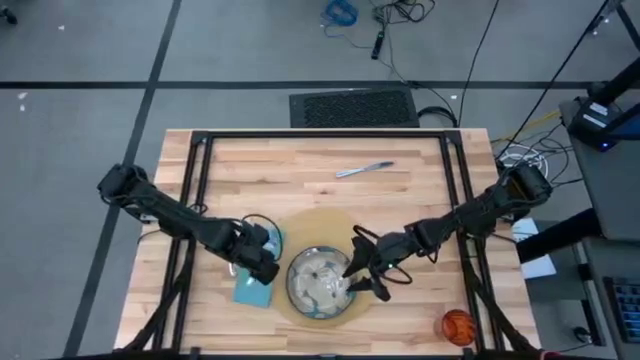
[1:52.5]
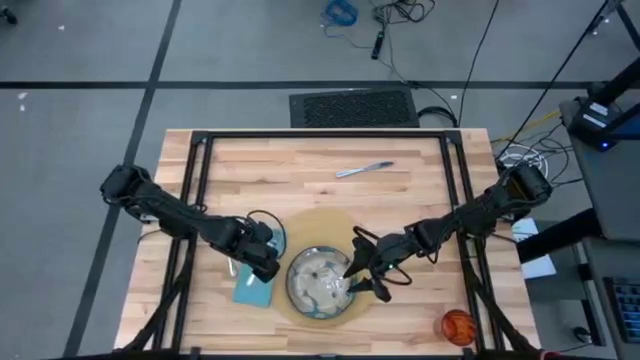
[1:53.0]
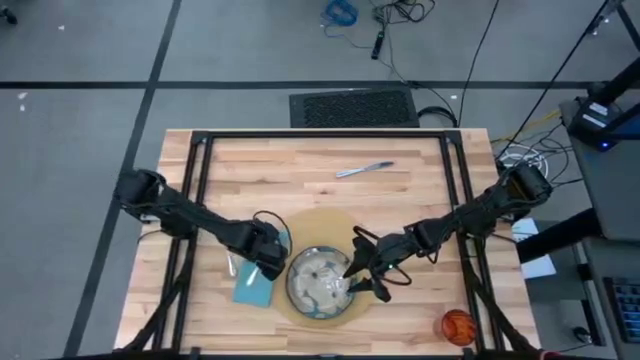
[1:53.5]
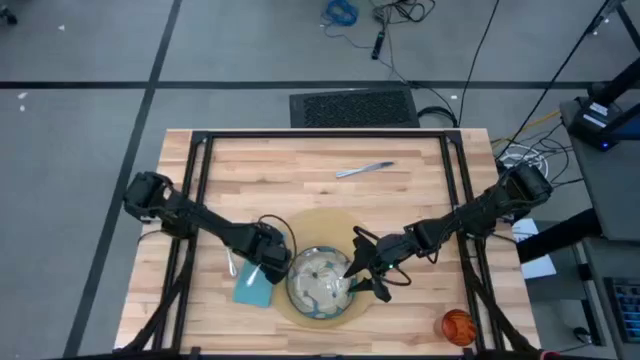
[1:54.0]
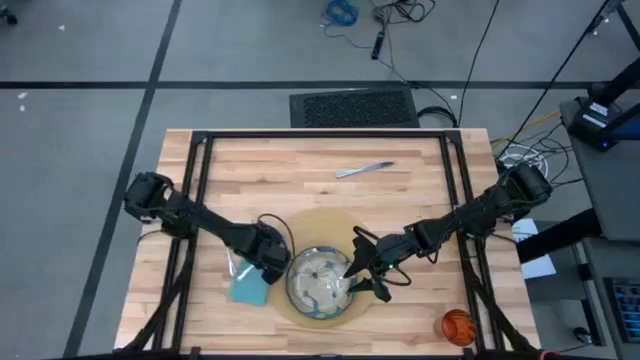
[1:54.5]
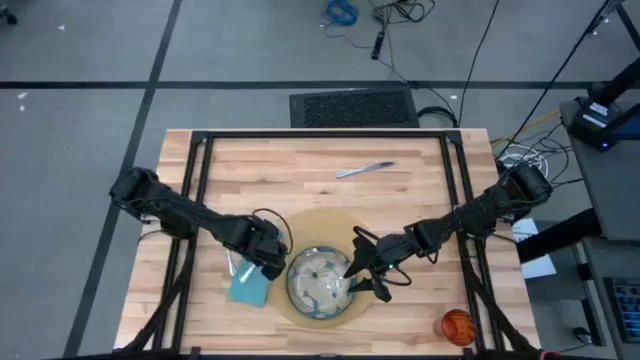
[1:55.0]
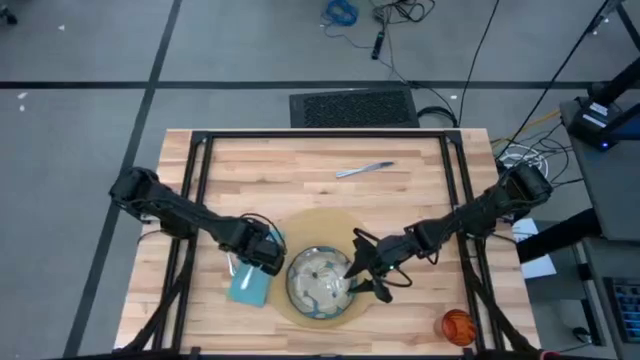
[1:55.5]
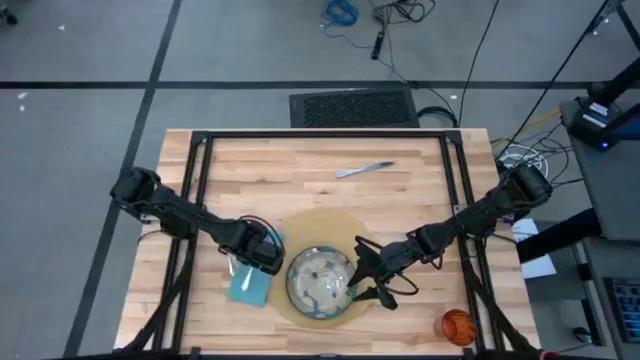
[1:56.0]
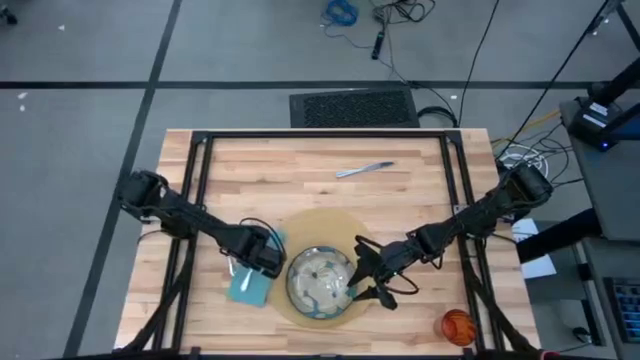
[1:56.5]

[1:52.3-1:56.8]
Task: Set table place
Put the silver fork on the blue napkin

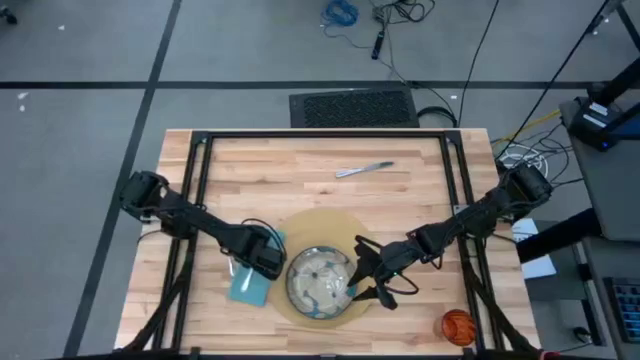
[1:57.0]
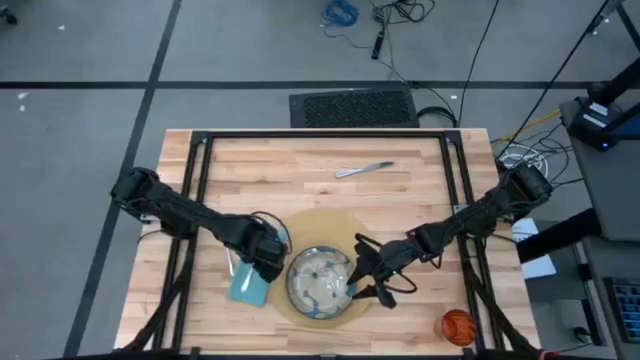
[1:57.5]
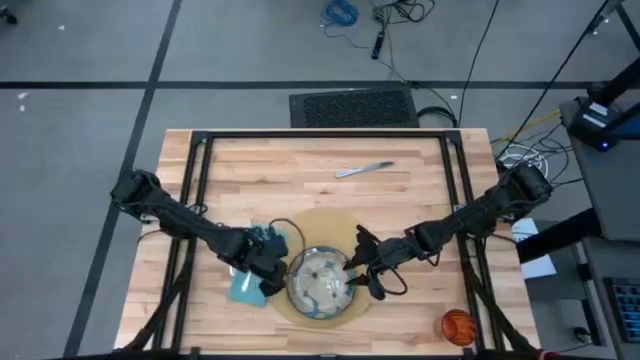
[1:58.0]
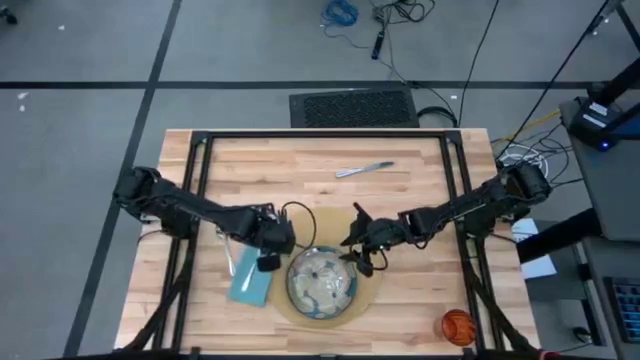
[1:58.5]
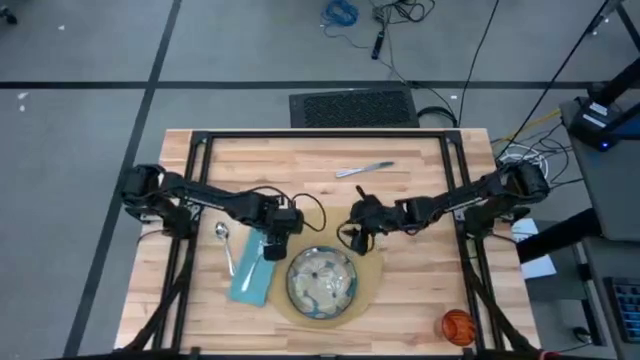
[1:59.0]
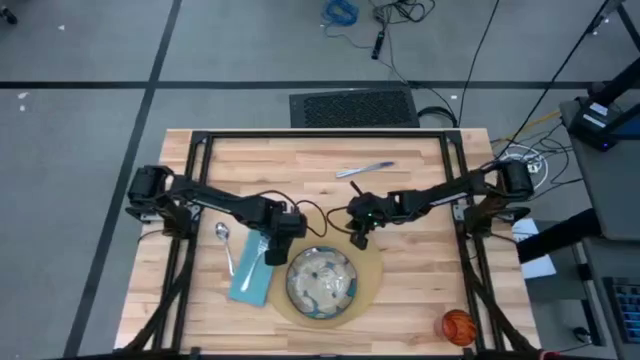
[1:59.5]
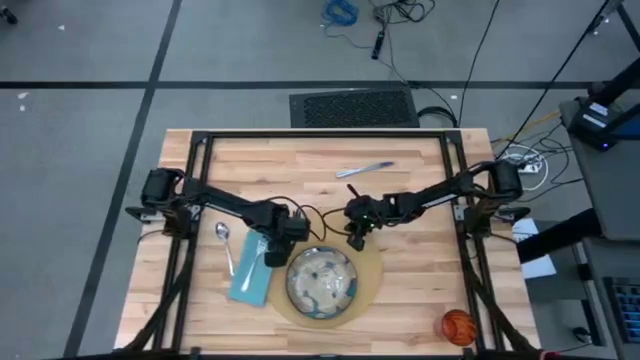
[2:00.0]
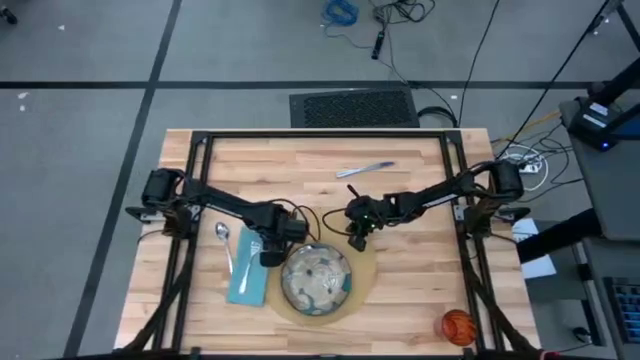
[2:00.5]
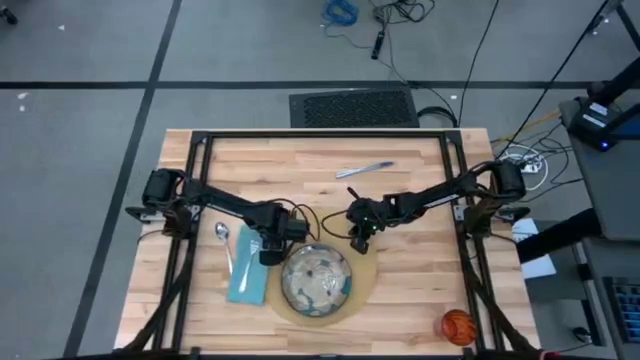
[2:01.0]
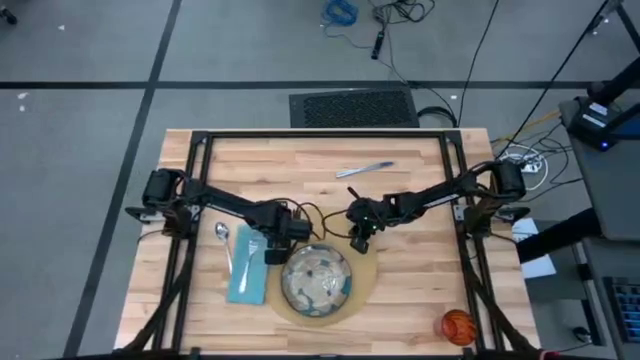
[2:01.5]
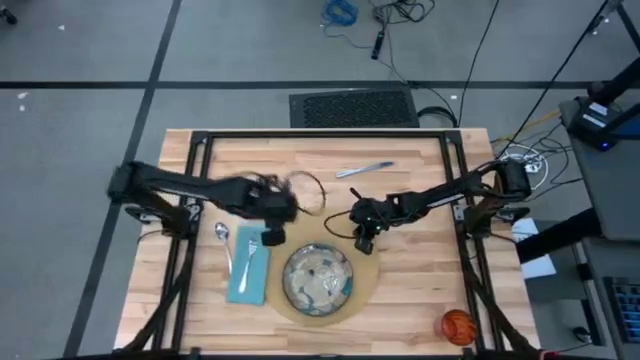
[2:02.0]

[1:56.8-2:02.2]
Adjust the brown mat on the table

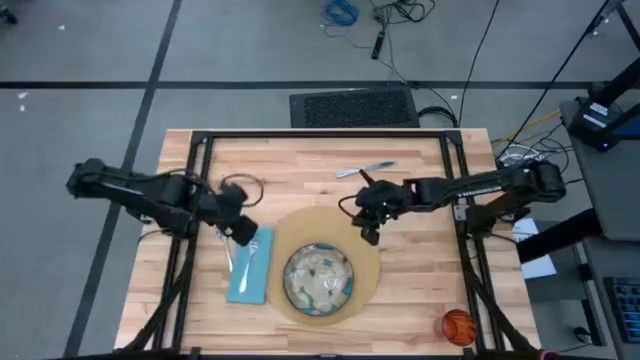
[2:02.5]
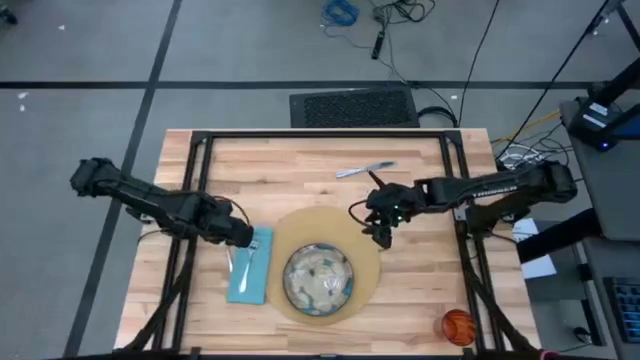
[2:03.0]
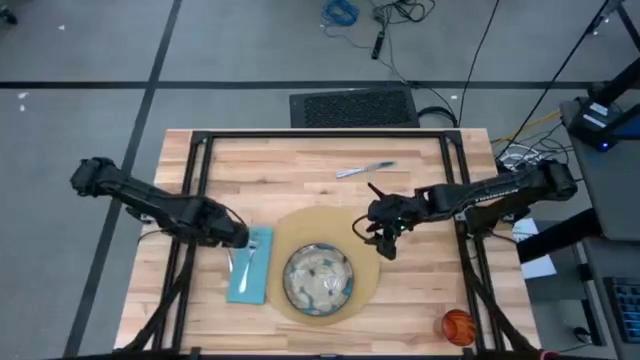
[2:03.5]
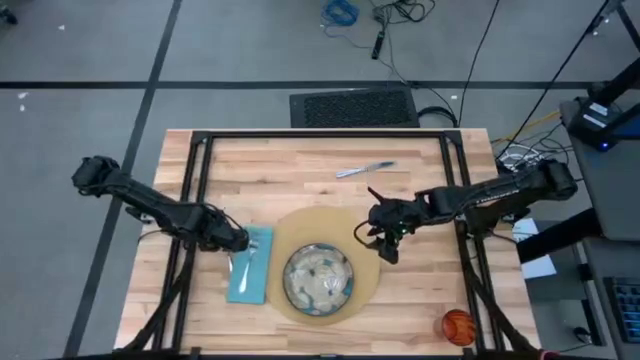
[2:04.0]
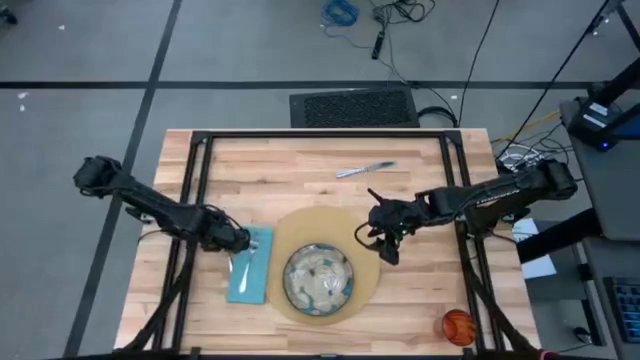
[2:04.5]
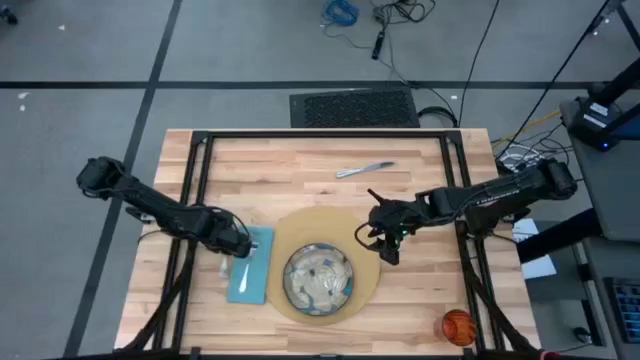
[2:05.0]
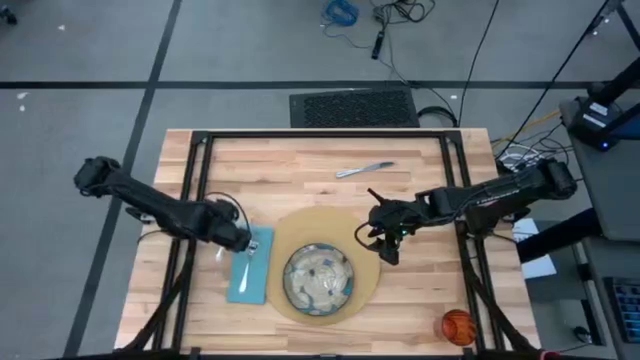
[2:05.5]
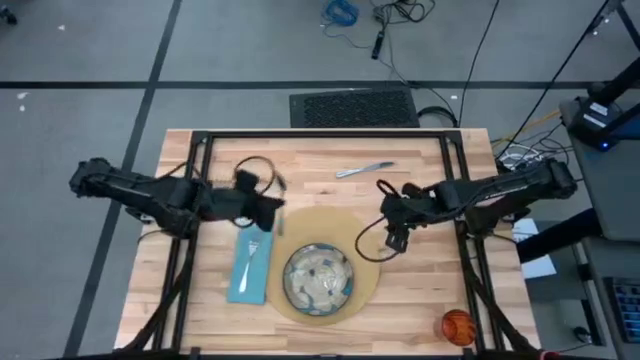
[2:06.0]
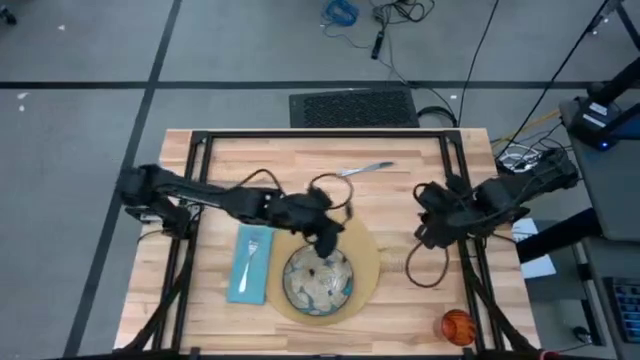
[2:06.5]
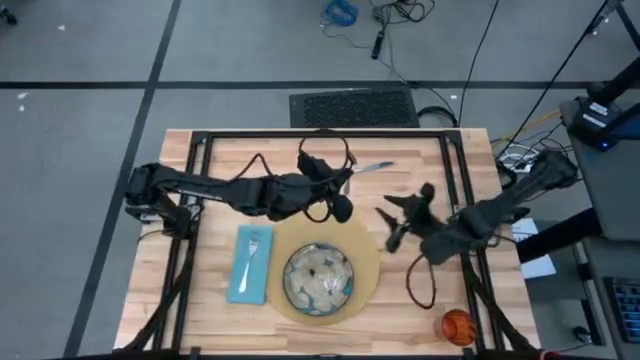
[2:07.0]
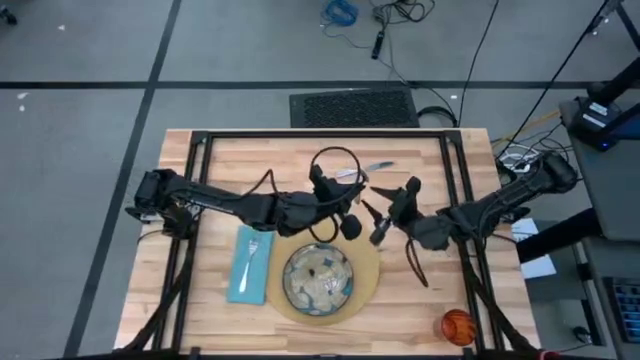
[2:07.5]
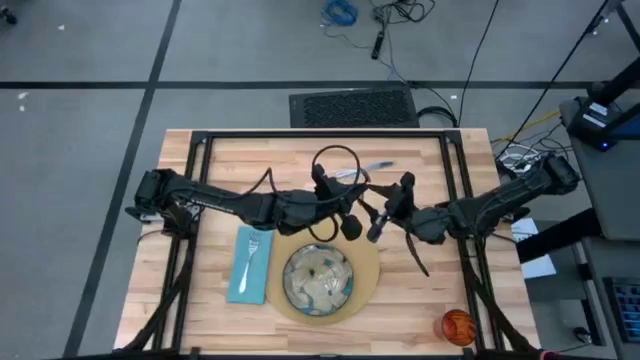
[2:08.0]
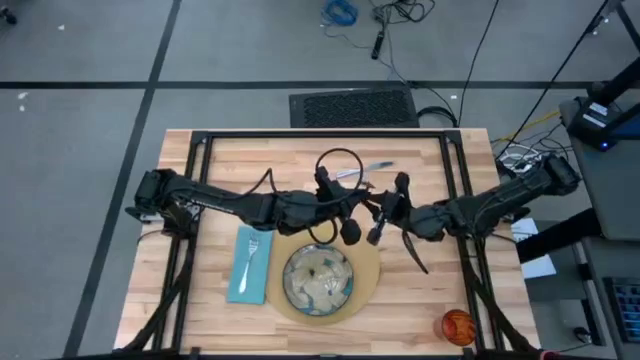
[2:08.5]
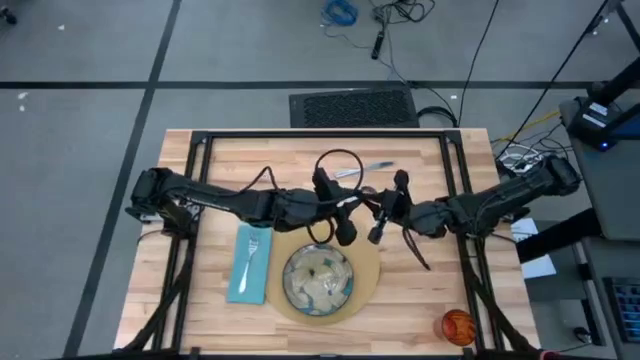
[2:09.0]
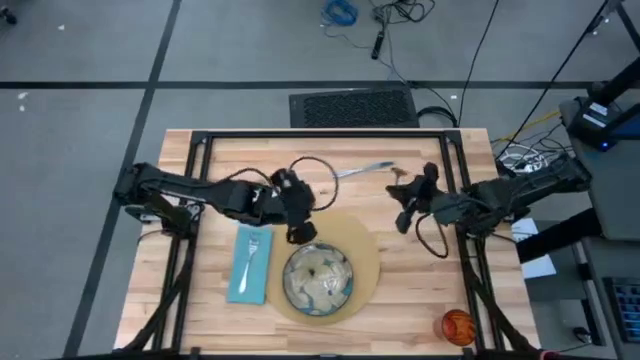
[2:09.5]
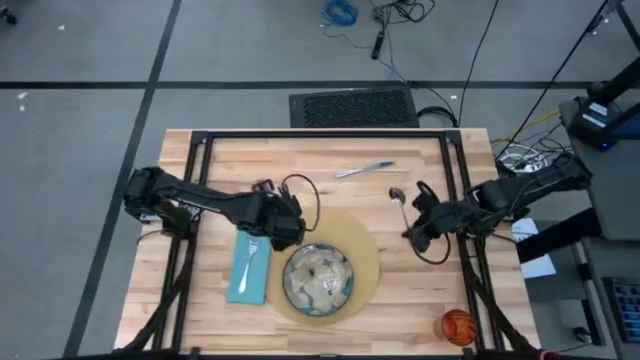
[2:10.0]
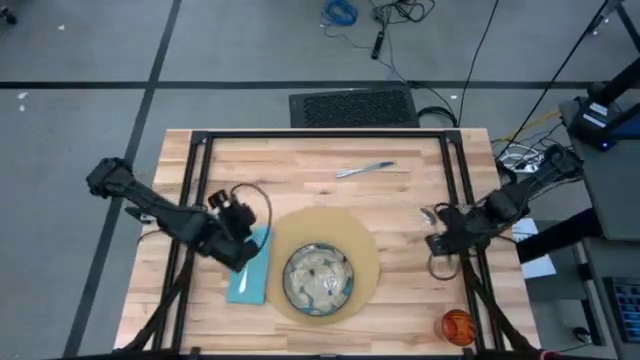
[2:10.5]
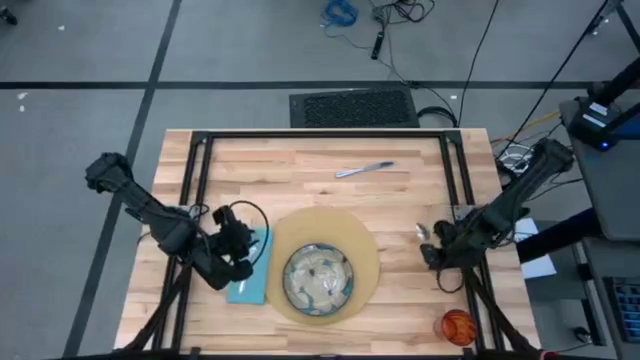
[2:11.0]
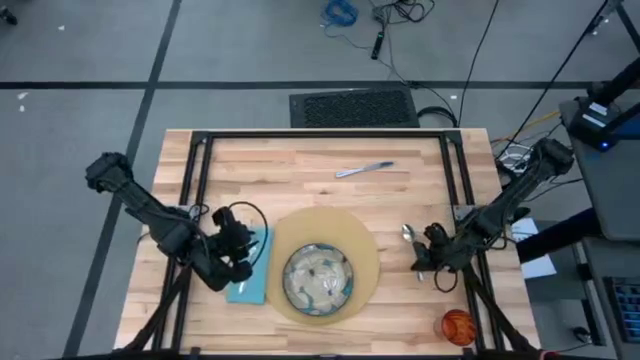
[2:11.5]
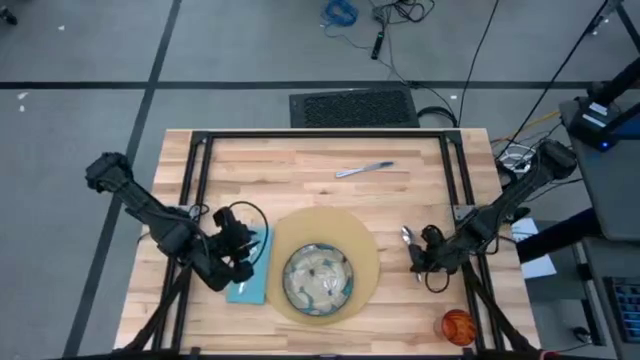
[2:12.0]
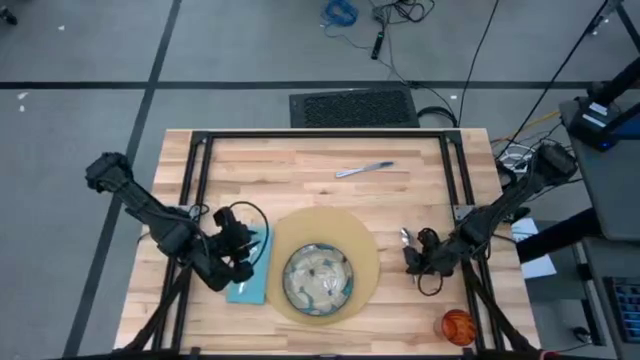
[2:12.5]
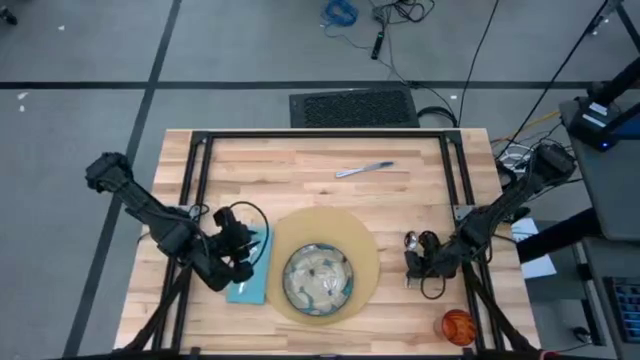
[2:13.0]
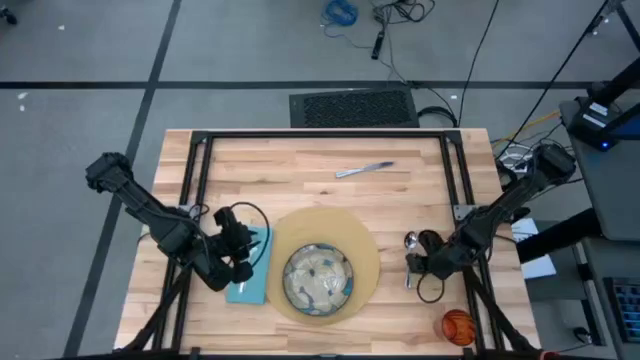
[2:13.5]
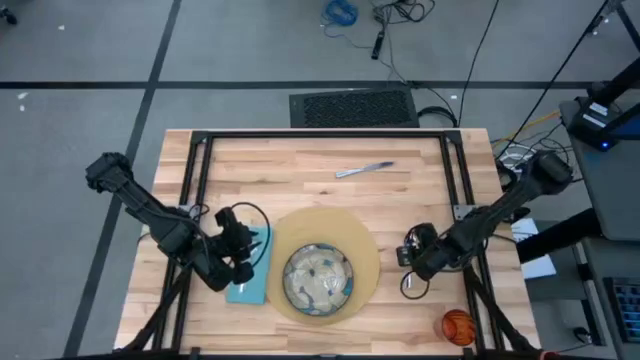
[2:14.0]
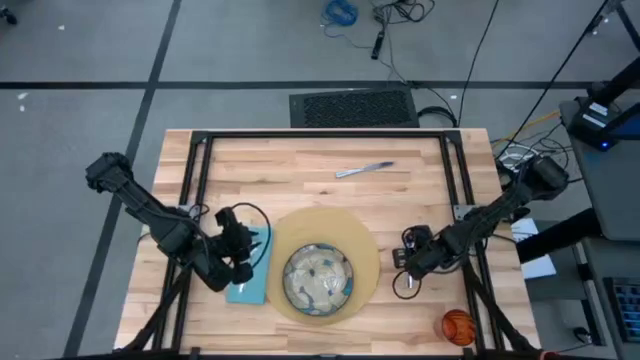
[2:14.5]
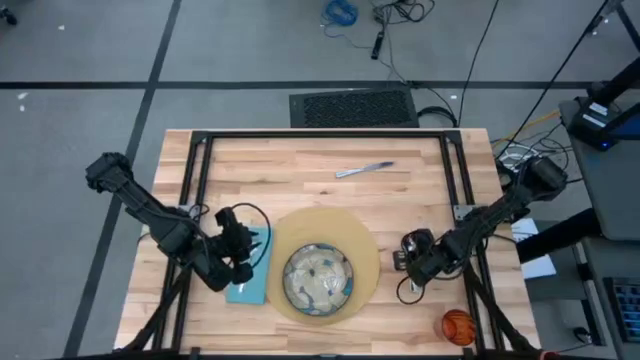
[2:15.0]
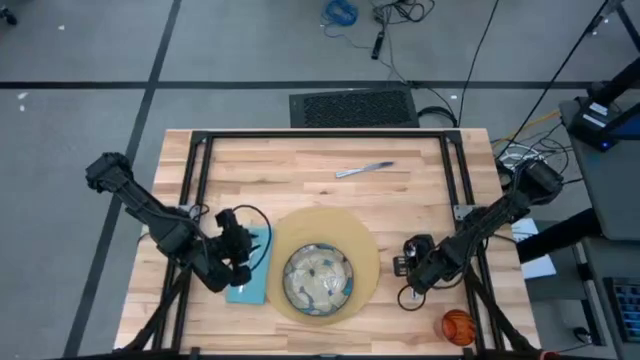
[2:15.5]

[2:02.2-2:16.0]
Put the silver spoon to the right of the brown mat
